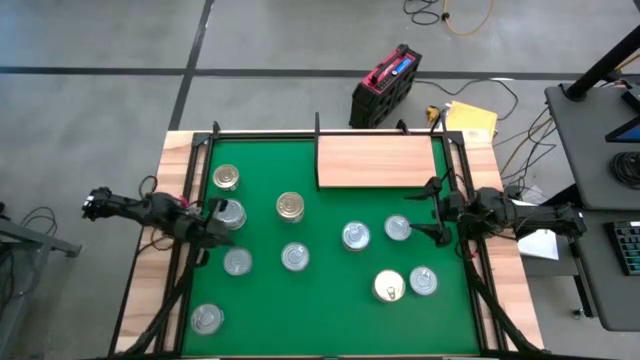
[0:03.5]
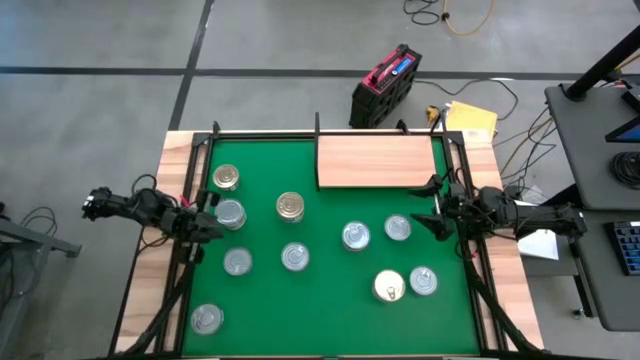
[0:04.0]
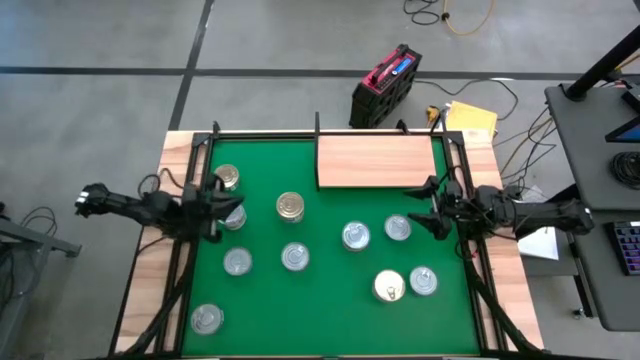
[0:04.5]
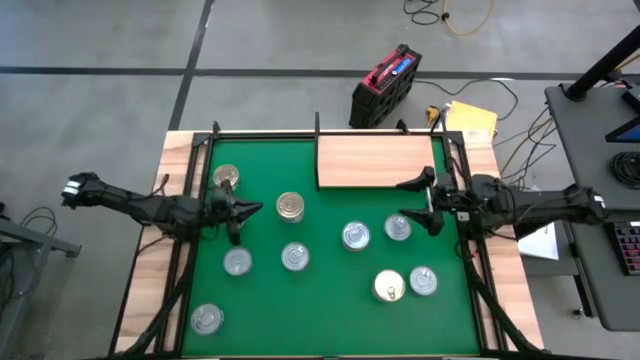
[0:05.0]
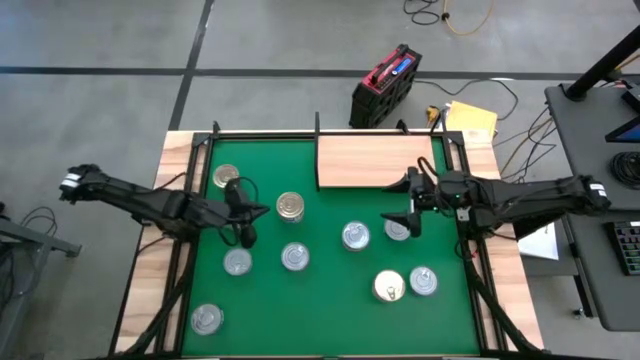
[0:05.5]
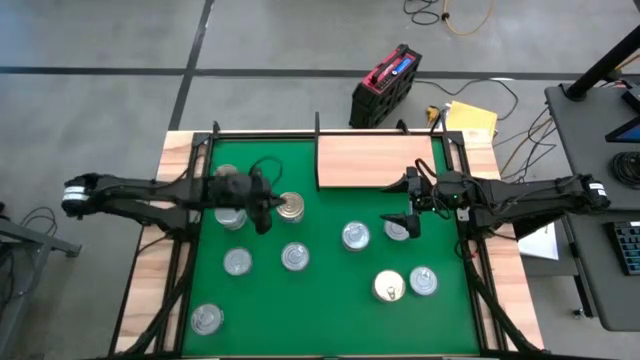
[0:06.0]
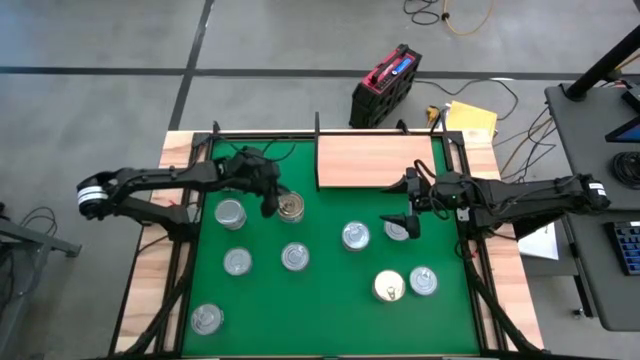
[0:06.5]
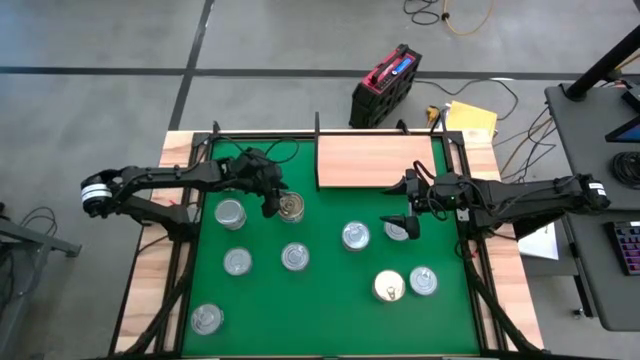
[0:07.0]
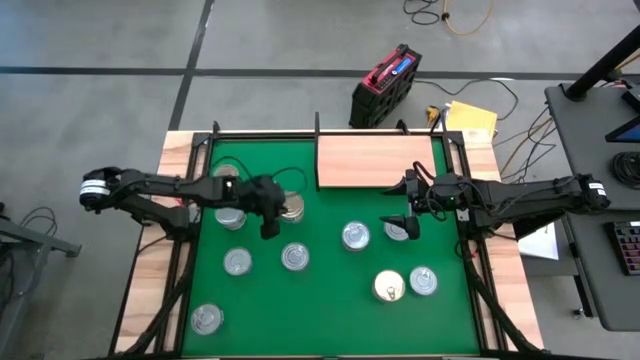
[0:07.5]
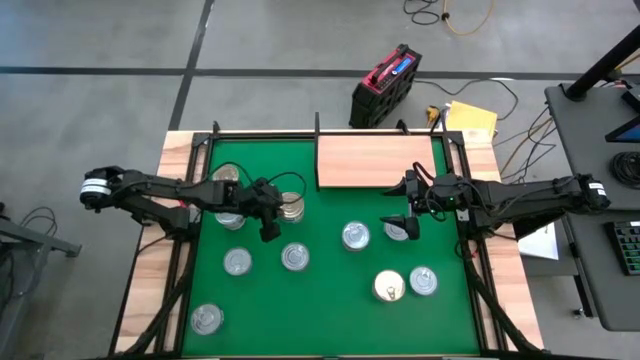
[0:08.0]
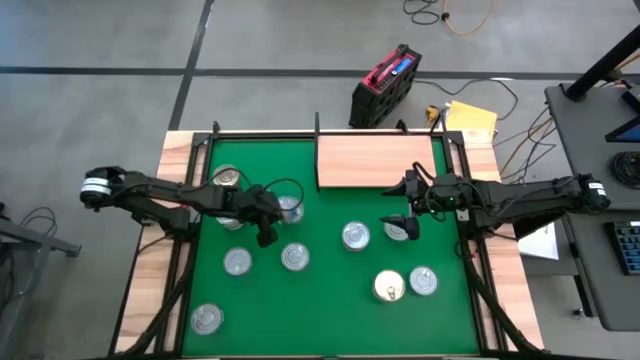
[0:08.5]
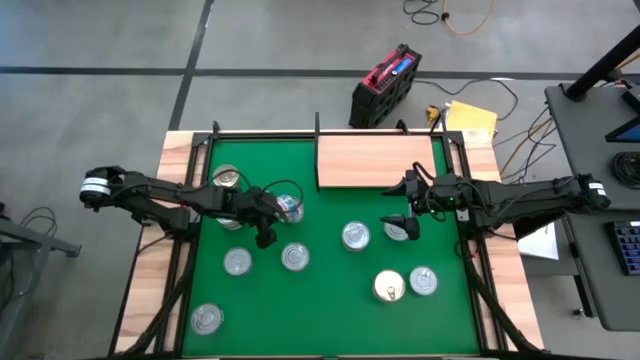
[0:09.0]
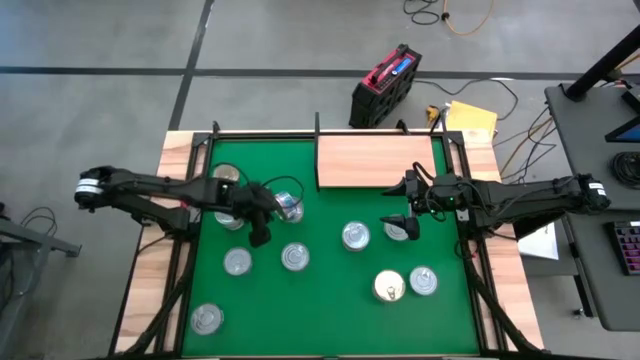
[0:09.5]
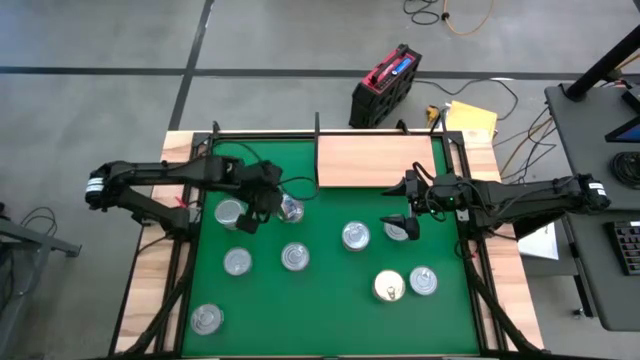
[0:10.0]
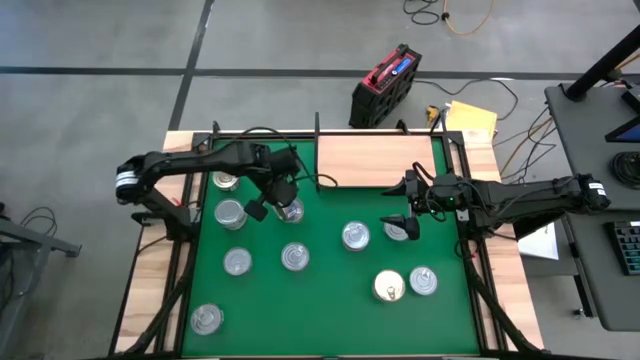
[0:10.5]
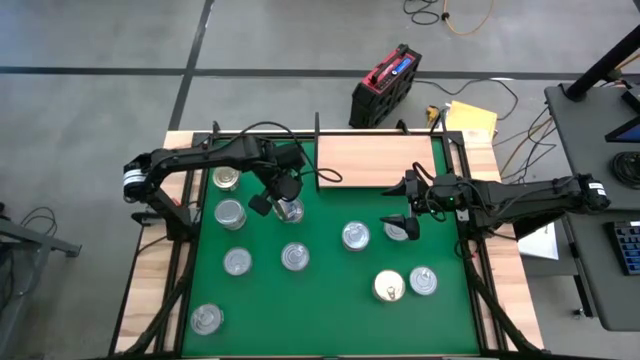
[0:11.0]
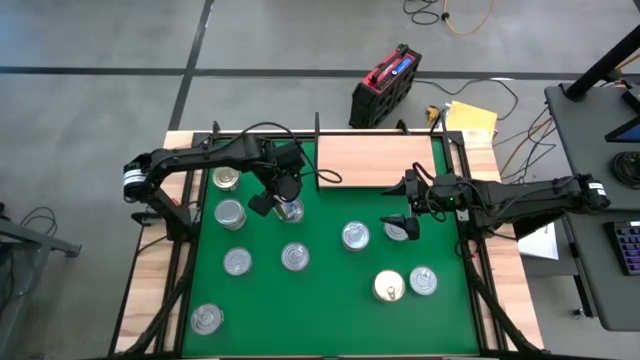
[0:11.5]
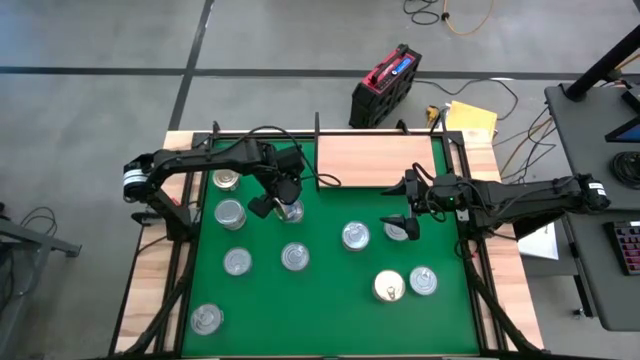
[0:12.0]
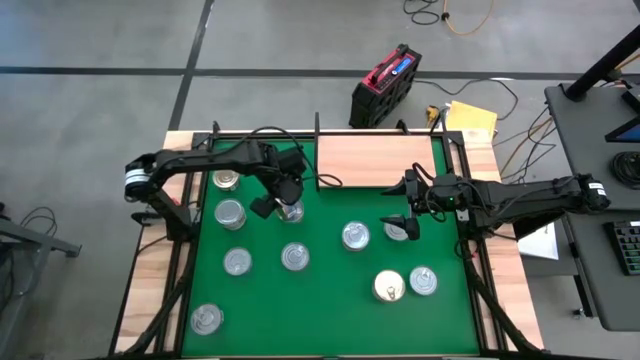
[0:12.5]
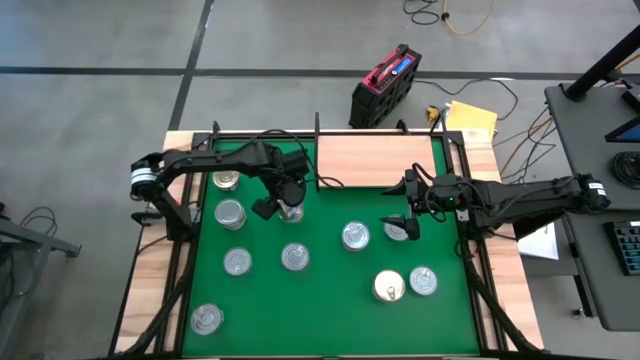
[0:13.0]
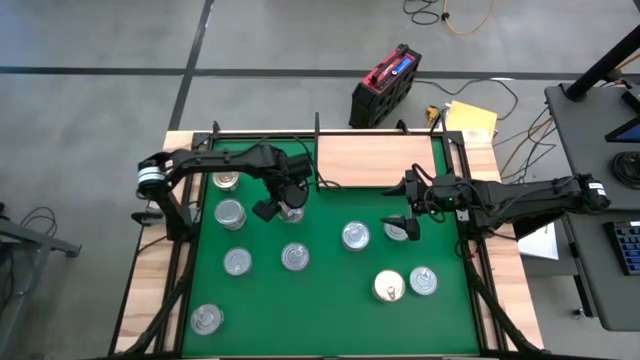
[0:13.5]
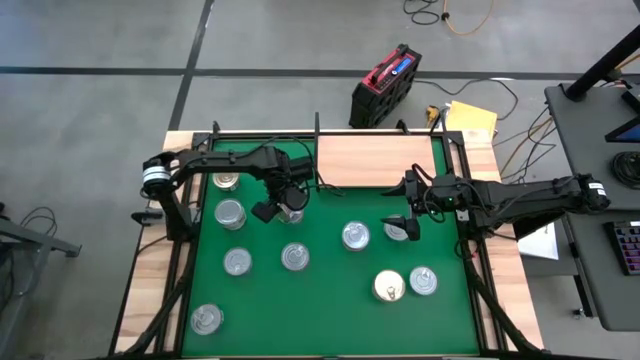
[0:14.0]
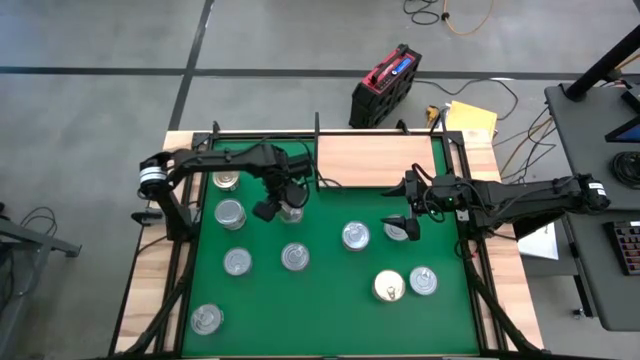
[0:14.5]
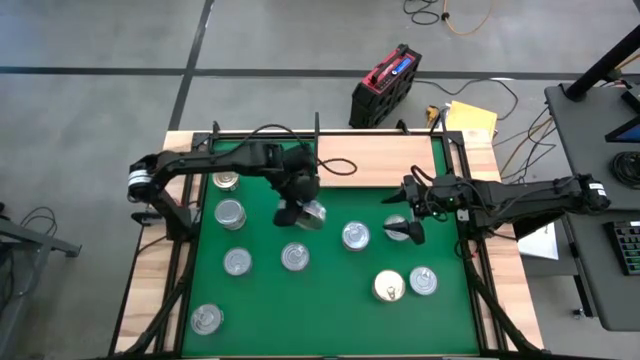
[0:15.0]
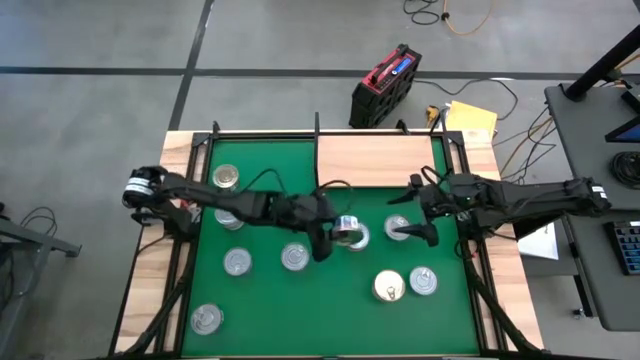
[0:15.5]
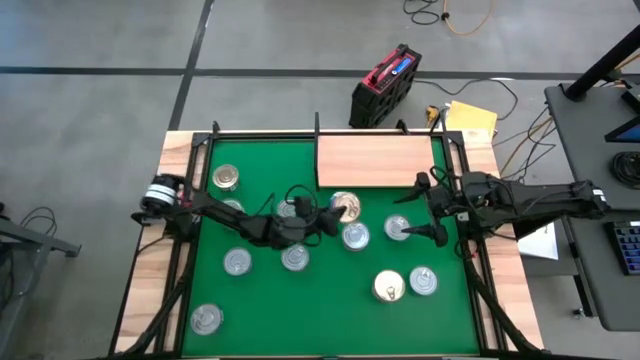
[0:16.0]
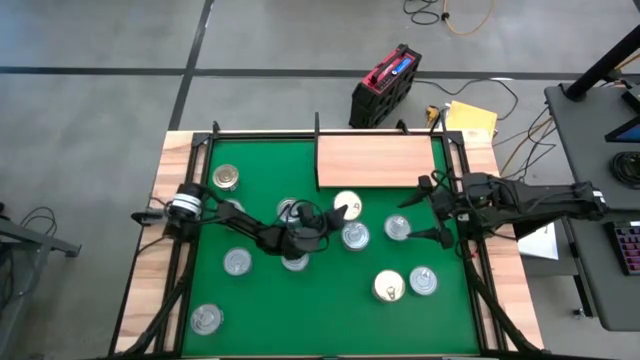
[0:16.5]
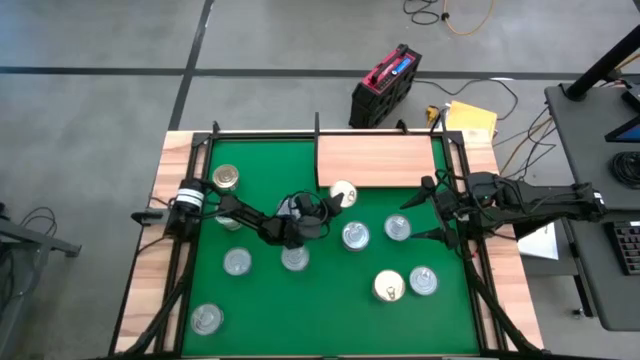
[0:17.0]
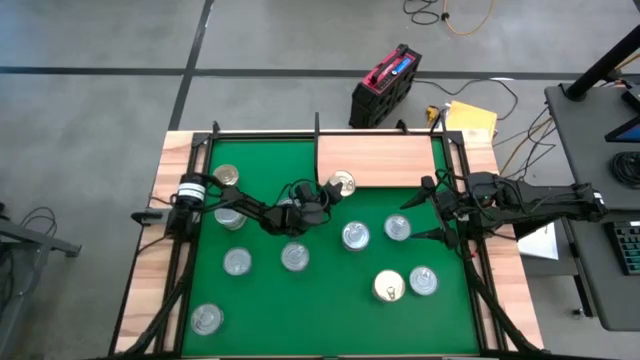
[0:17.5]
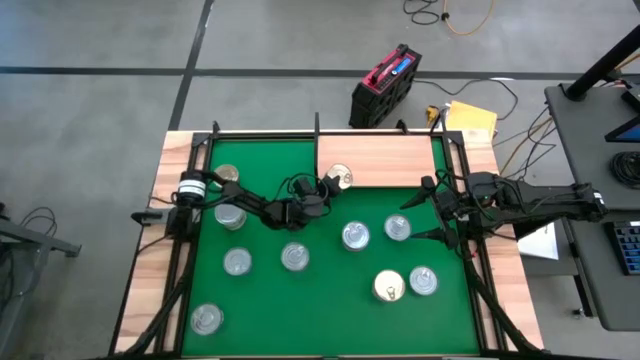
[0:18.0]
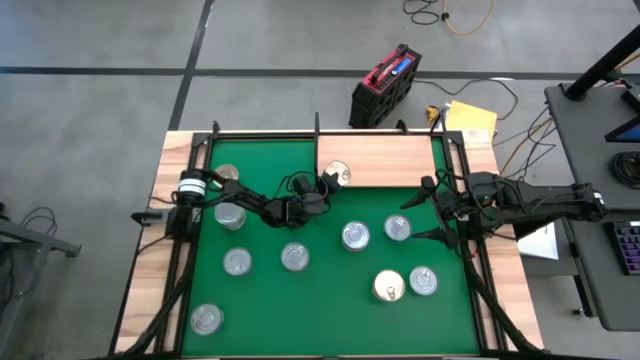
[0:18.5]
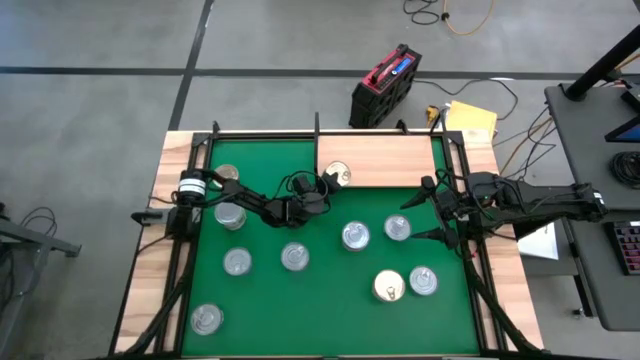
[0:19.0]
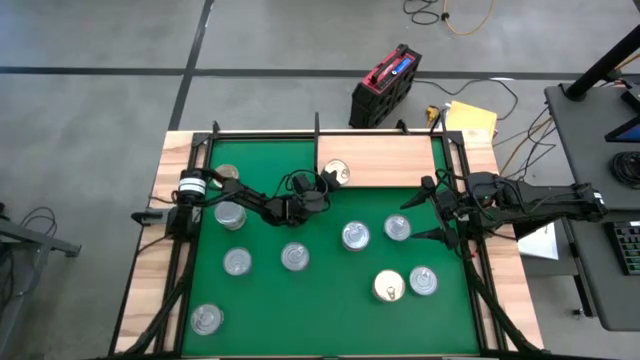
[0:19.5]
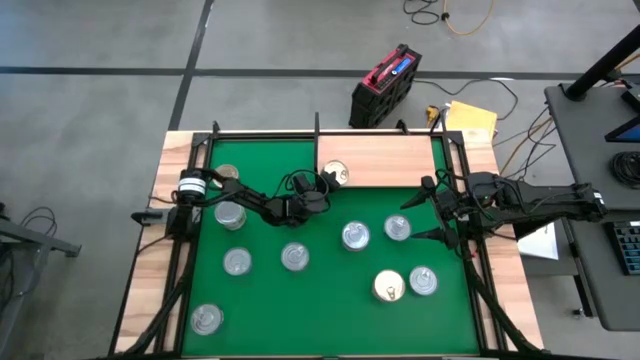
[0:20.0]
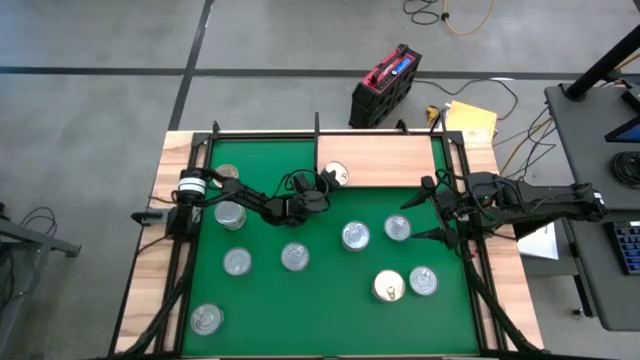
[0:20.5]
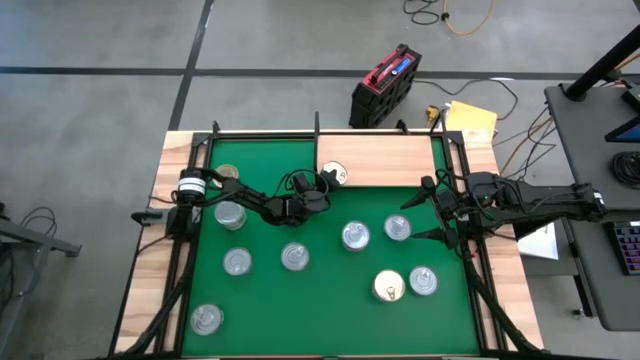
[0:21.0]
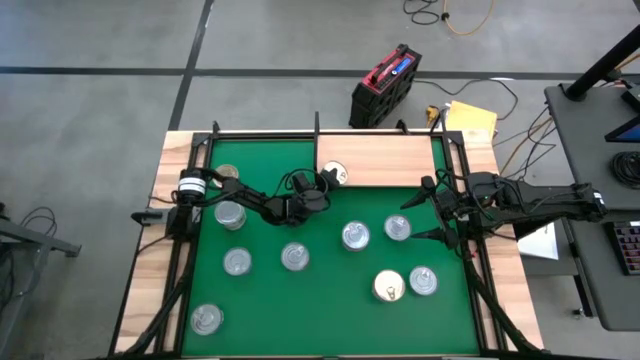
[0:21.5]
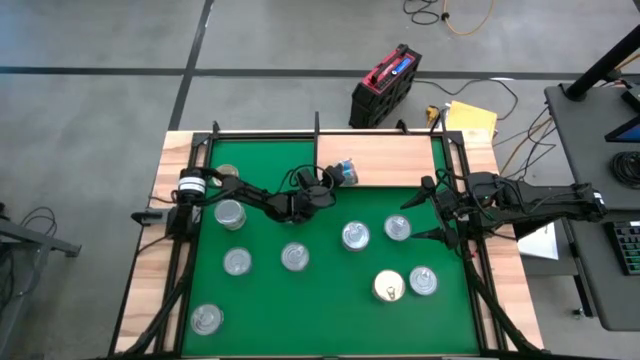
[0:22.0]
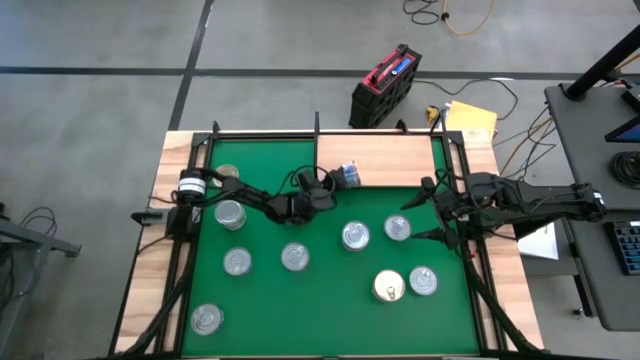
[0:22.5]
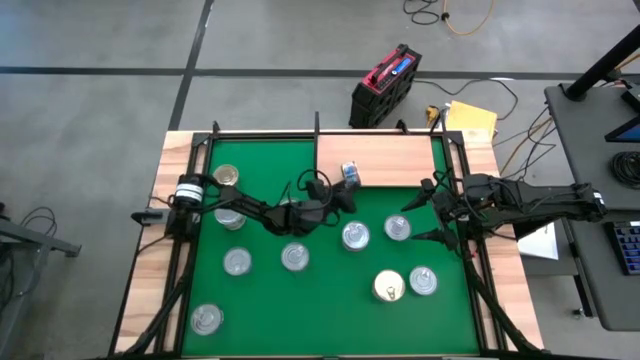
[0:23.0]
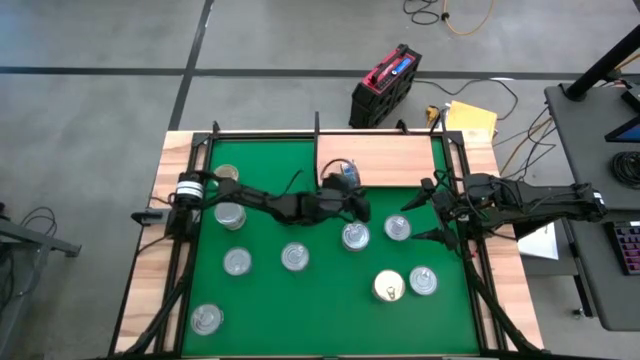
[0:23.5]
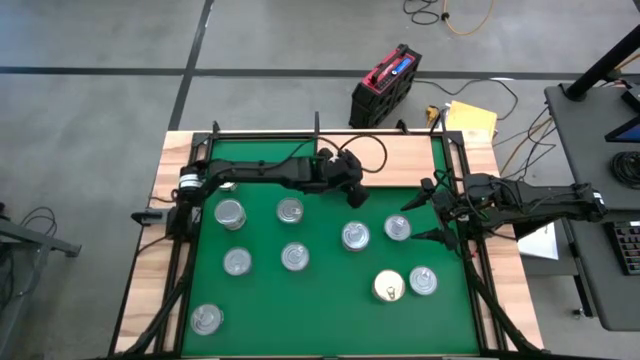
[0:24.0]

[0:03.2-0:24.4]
Task: Stack canned seafood by type on shelf
Put the blue/pink tuna can on the shelf
